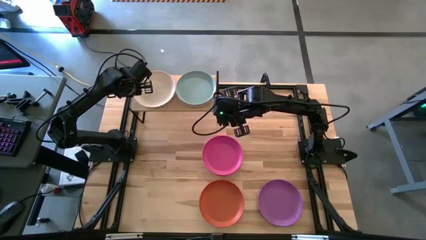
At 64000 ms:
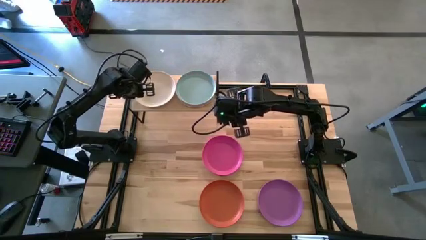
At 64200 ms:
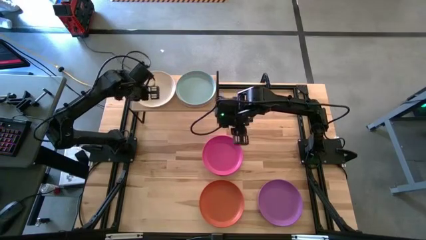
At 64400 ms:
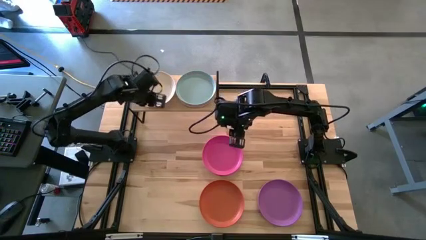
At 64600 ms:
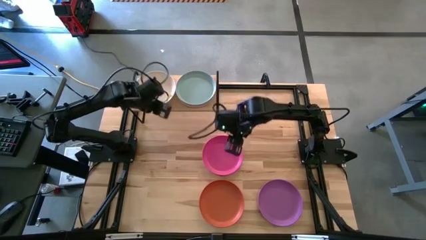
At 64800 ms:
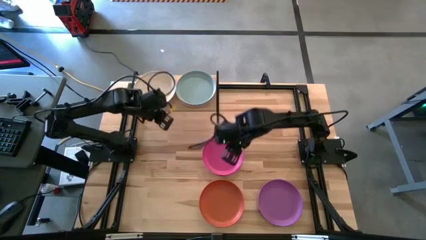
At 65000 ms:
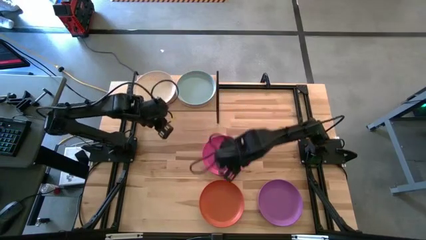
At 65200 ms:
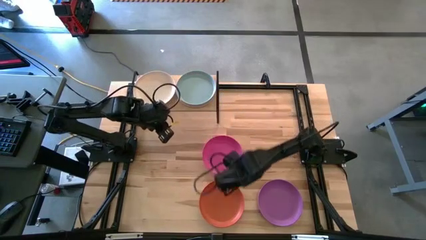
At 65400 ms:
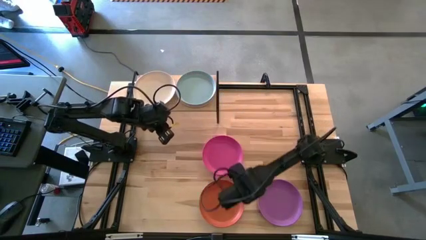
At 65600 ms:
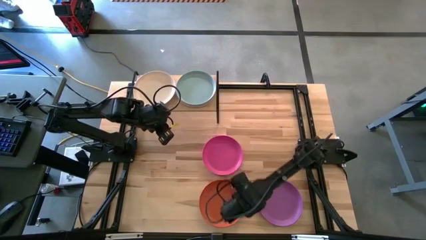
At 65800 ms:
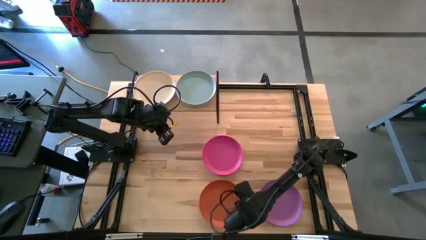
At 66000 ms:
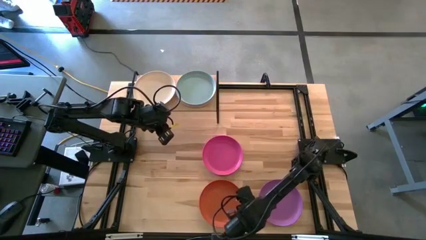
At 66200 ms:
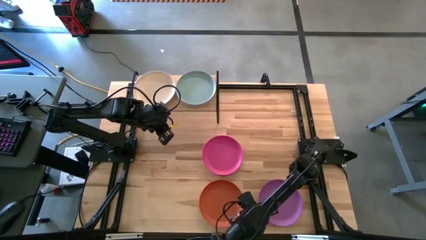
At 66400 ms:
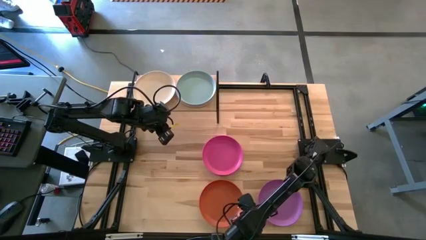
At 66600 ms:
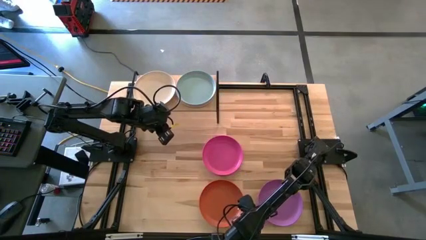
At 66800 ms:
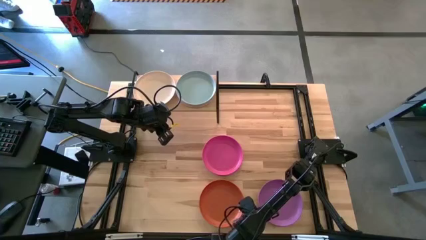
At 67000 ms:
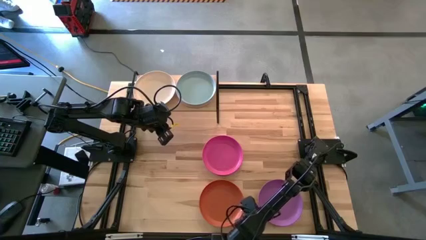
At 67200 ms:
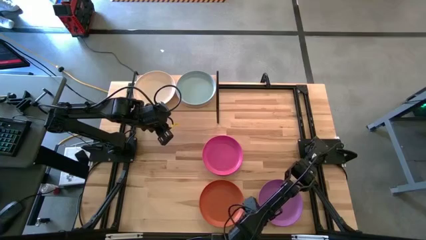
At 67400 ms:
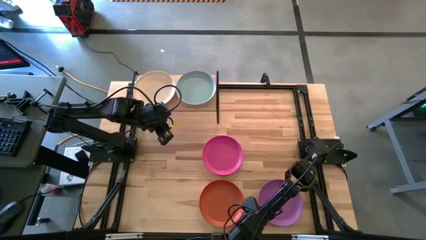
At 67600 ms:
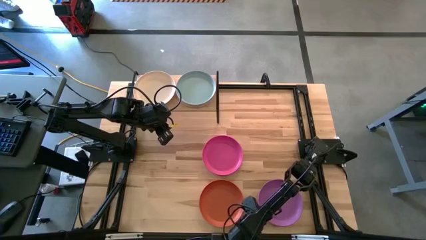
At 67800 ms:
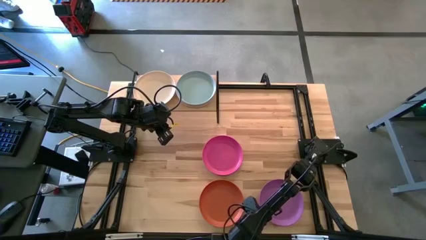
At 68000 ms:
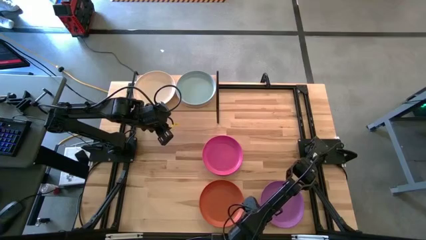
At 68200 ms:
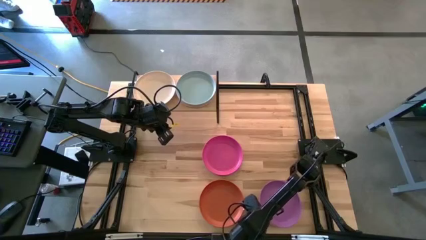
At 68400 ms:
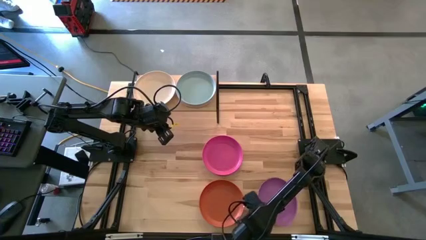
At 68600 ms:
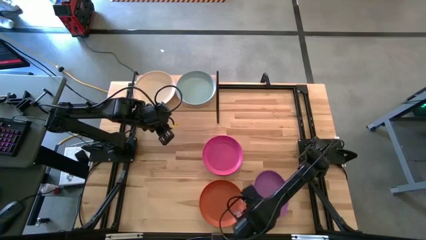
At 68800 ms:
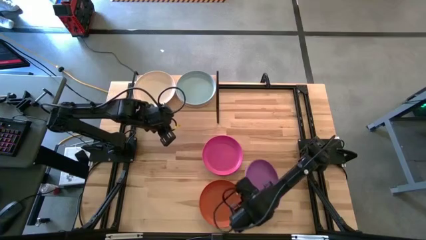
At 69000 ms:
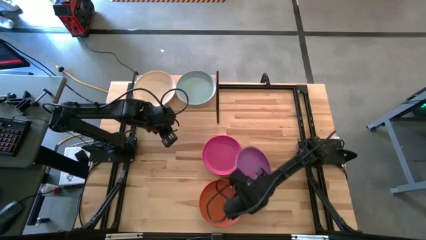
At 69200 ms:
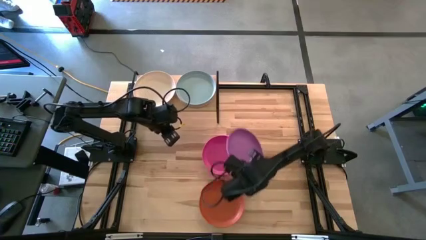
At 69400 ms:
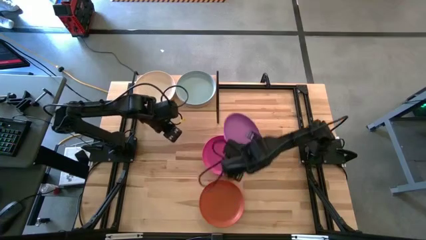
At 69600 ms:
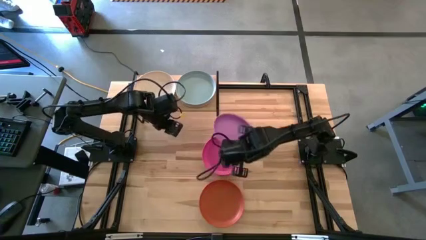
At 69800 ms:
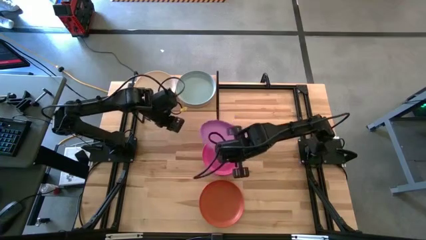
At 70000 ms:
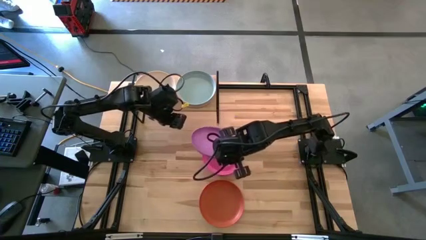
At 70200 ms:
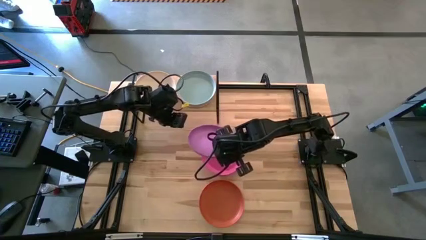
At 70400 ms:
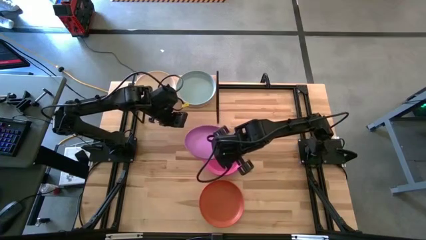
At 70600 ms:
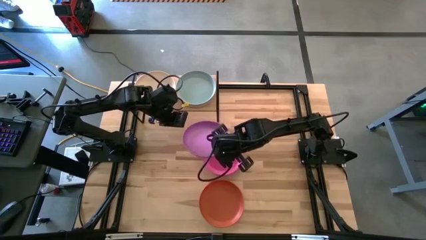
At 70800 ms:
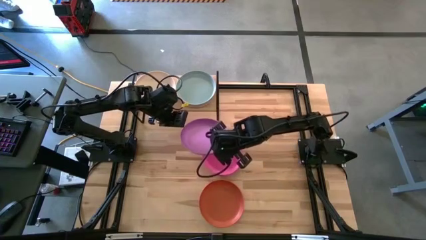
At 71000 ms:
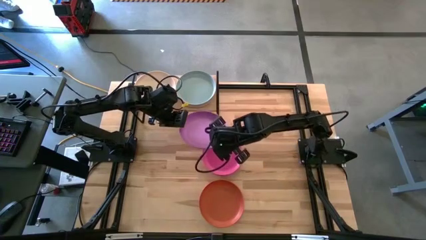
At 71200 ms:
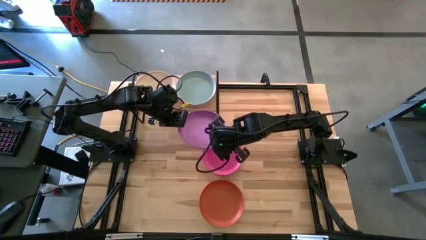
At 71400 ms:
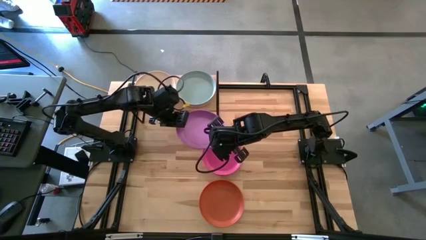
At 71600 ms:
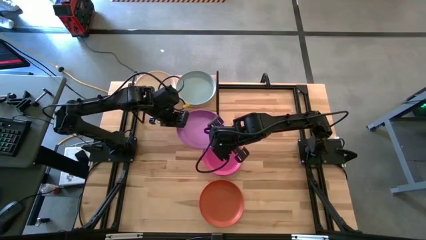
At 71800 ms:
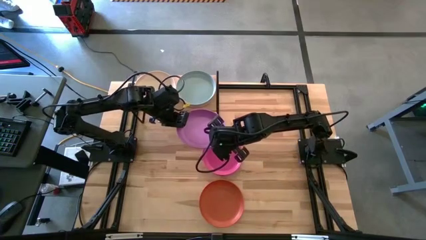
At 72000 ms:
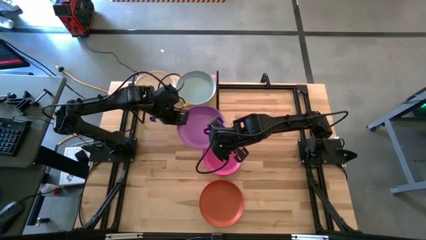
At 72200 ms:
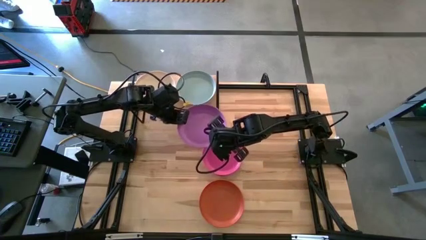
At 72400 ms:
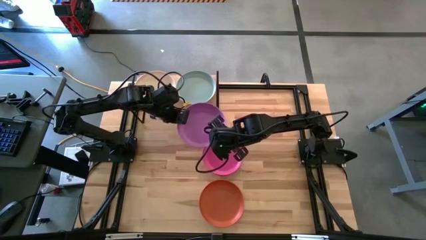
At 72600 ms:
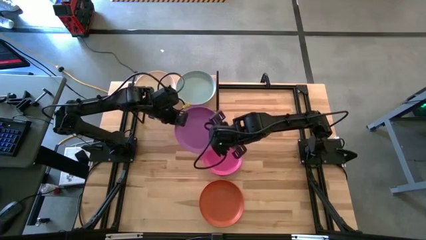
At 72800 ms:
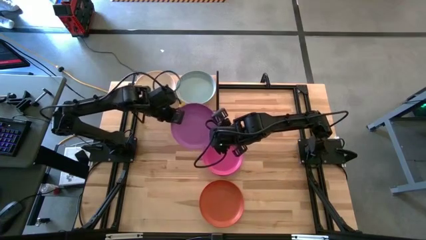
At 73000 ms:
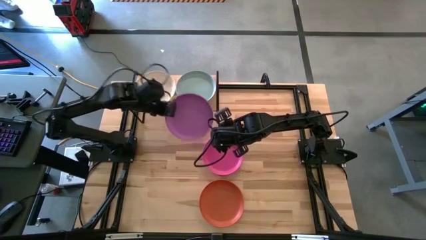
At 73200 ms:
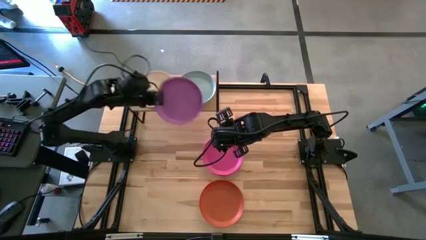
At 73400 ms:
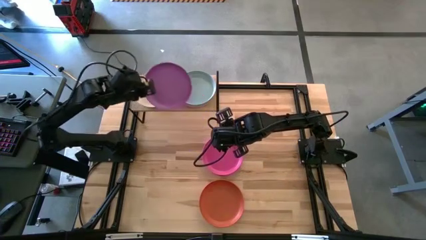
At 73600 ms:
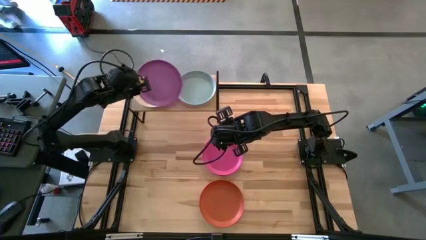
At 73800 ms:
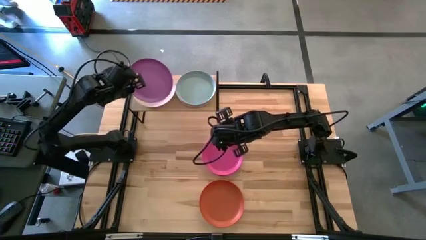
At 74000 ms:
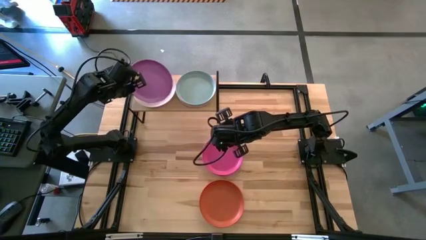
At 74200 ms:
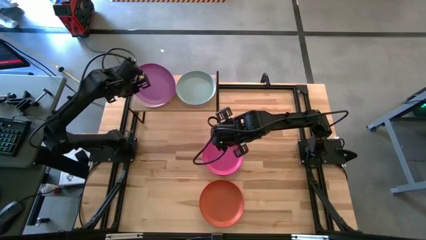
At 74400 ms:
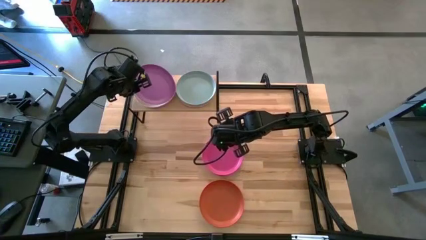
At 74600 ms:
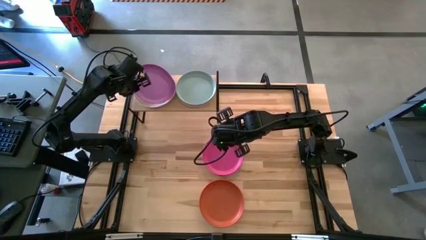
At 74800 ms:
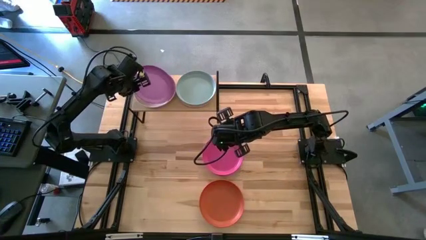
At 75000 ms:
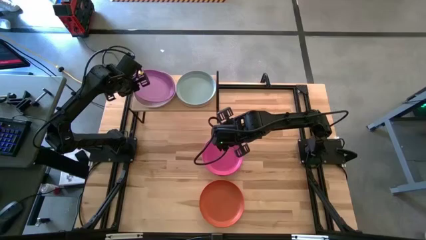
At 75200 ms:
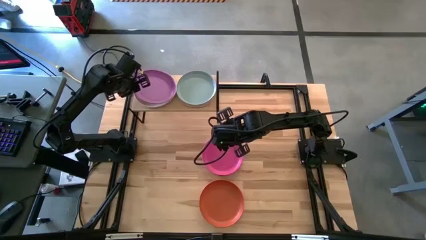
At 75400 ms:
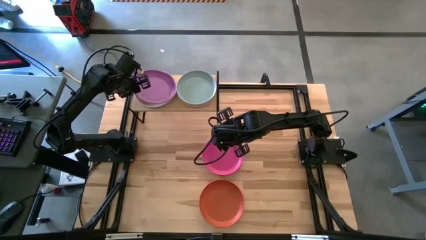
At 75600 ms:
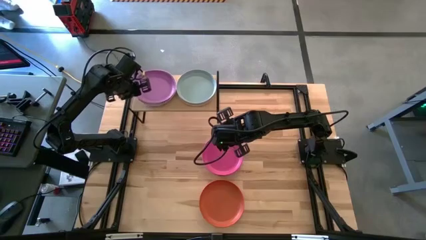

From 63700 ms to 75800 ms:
Task: Place and stack plates onto a shelf
Stack the purple plate on top of the white plate on the shelf

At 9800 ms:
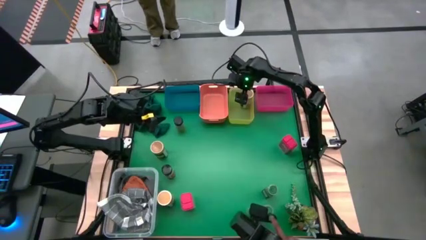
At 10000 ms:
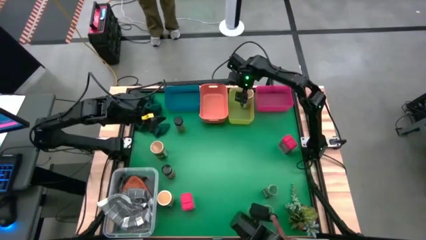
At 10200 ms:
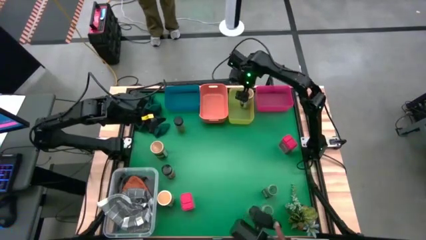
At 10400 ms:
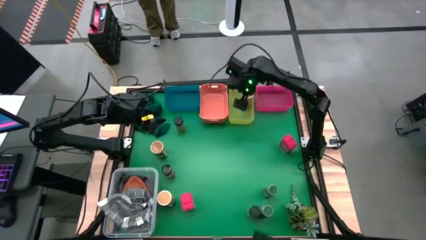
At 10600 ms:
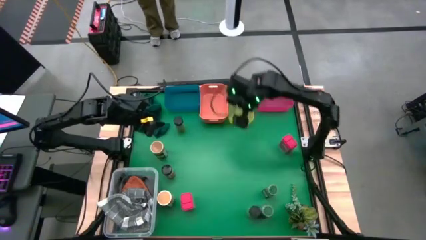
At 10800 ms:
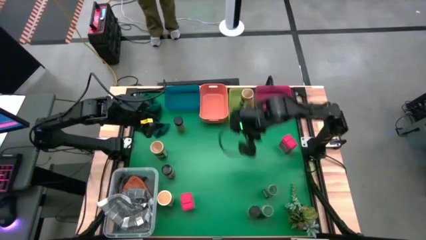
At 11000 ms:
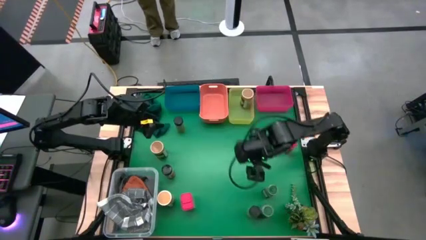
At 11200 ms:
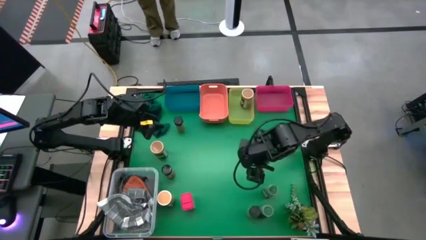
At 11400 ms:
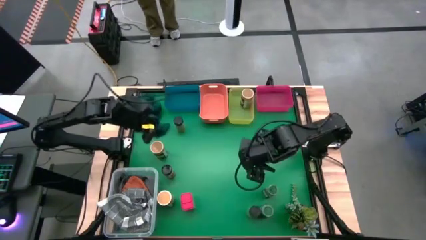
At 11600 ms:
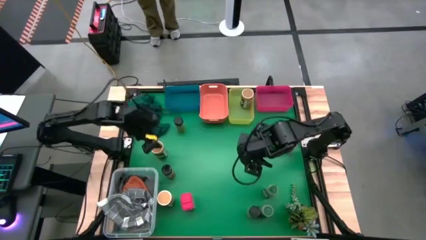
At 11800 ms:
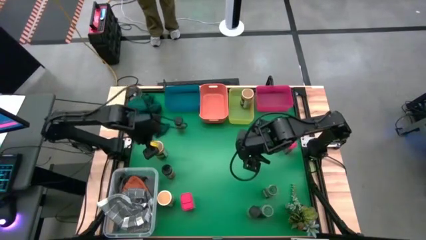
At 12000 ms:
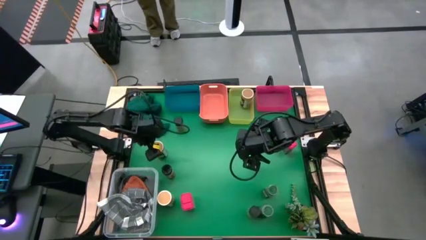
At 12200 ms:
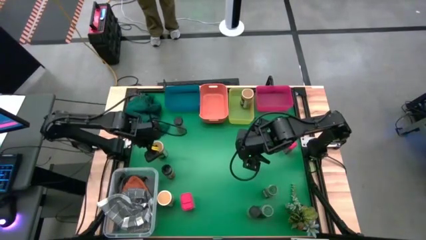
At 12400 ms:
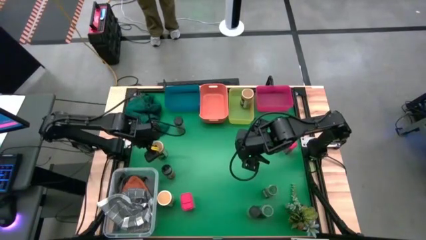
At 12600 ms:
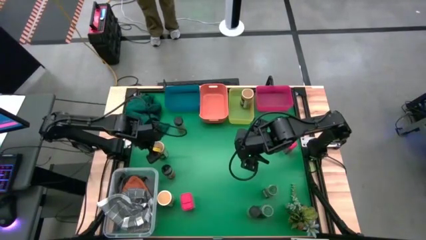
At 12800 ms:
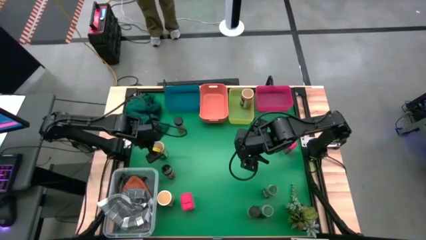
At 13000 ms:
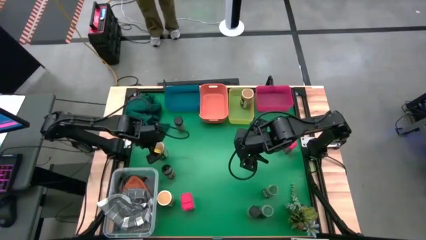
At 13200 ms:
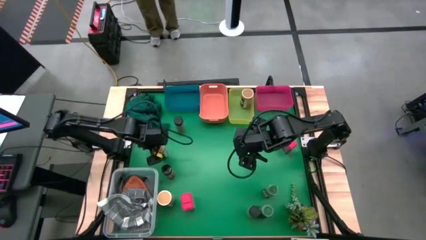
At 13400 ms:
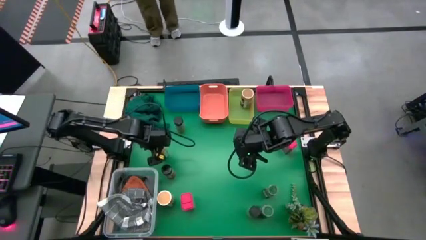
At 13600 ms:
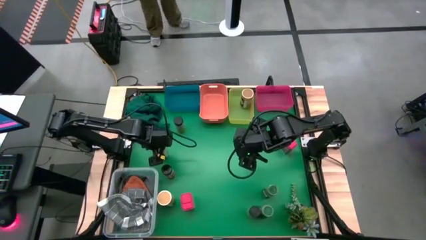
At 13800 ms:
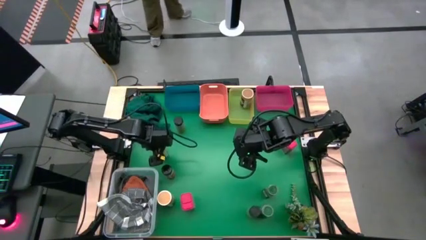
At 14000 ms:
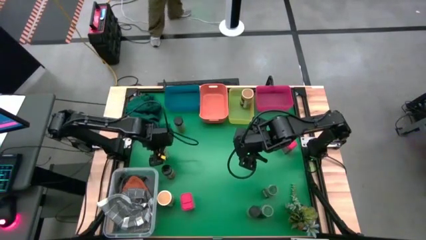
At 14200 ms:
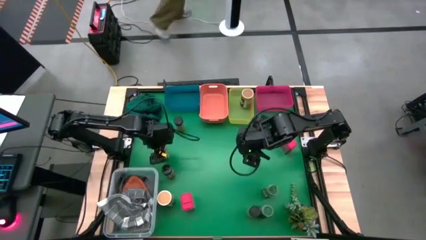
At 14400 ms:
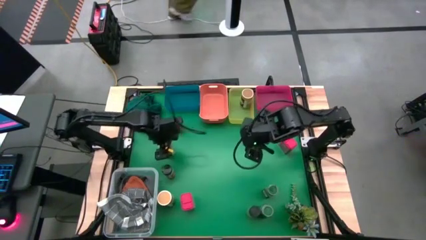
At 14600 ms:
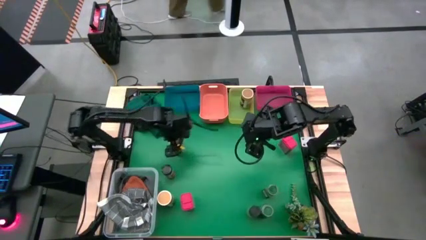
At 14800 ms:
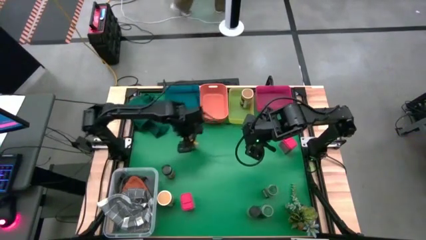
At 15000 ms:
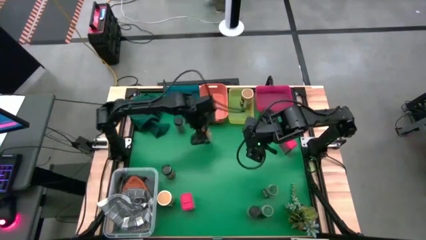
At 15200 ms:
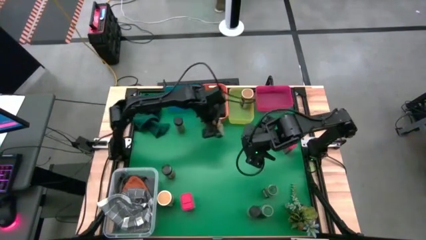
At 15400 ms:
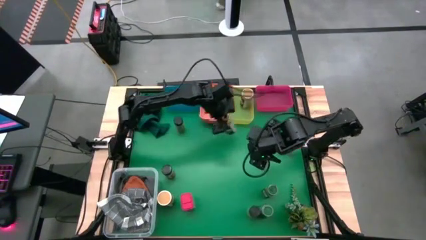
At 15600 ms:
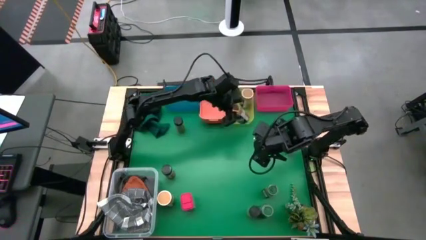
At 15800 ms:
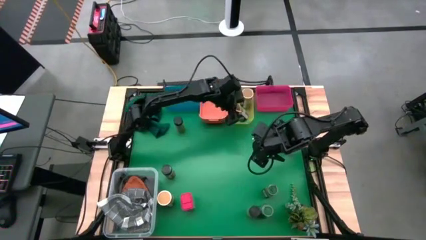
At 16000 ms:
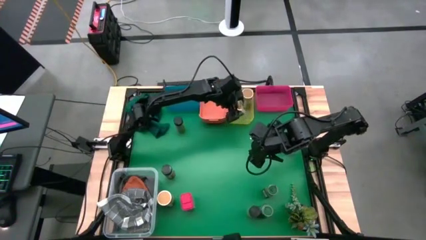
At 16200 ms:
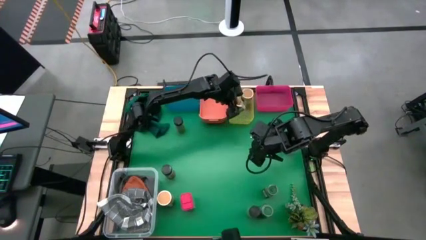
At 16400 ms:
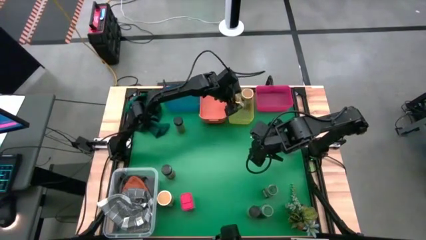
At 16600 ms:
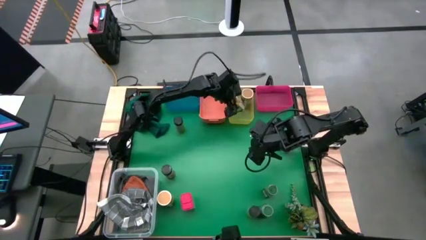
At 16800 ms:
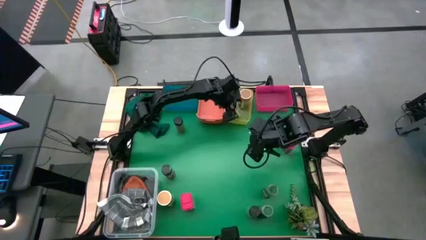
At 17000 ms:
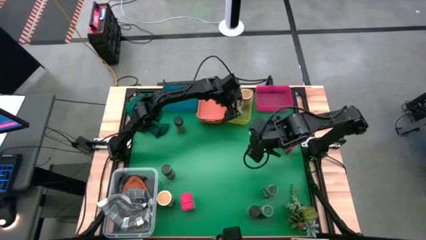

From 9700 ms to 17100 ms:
Task: Sort spices by type
Put the top yellow seasoning bottle into the yellow bin
